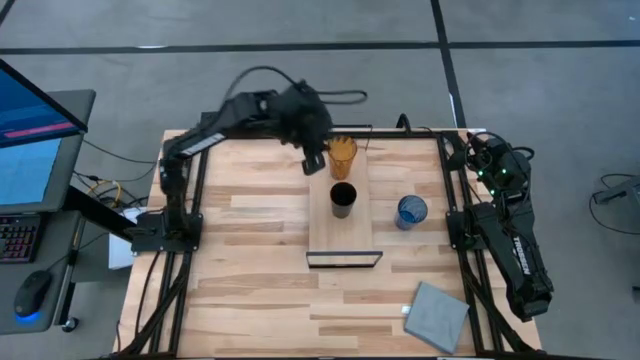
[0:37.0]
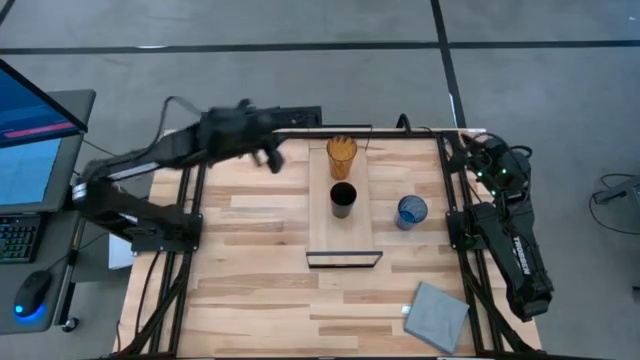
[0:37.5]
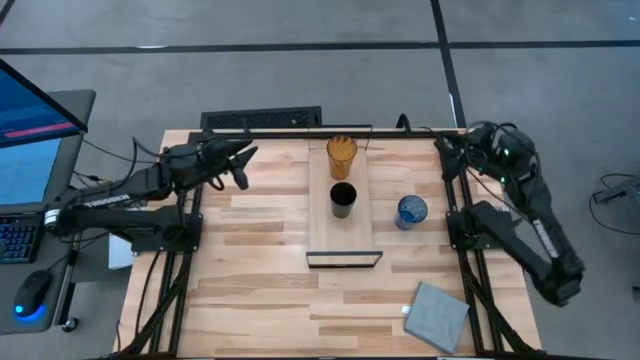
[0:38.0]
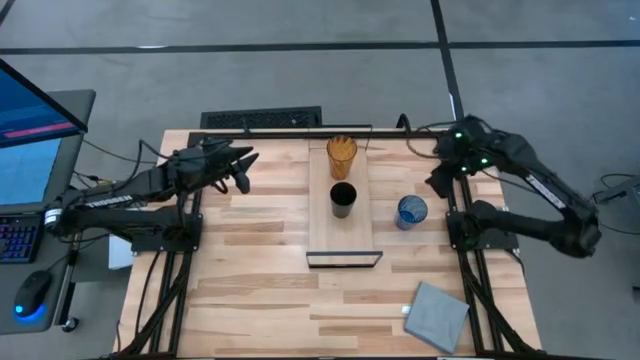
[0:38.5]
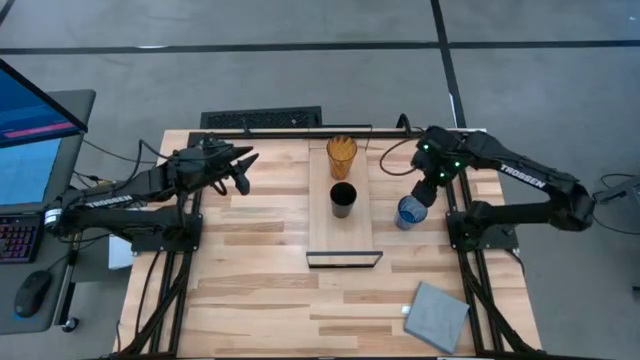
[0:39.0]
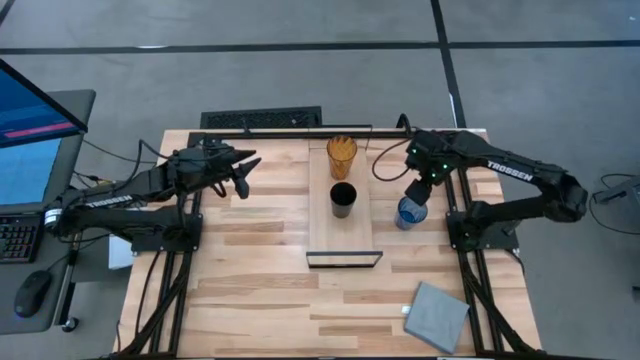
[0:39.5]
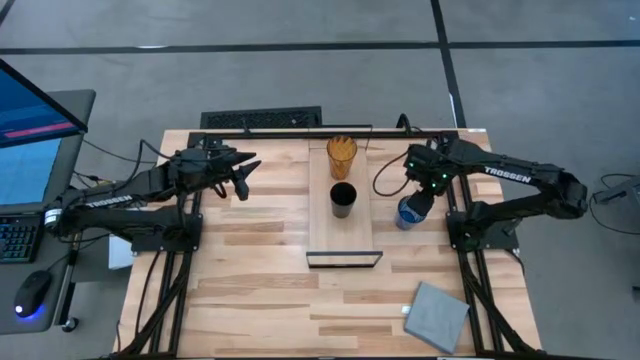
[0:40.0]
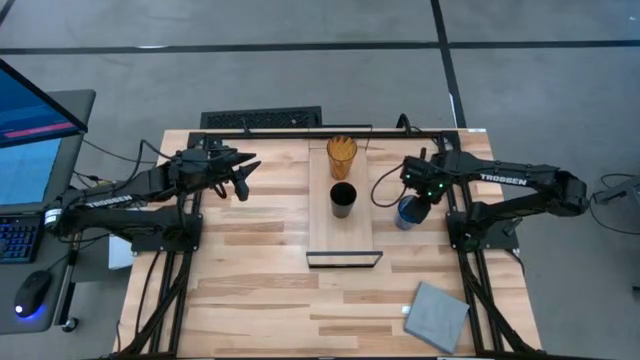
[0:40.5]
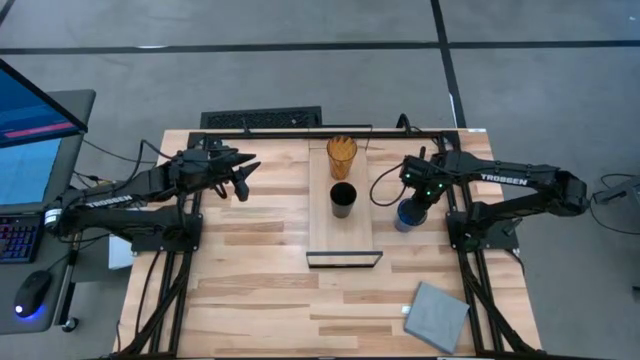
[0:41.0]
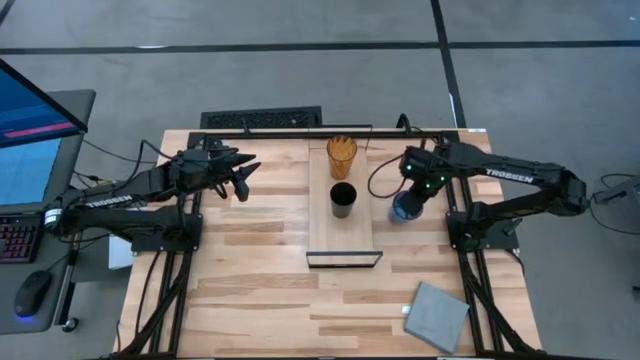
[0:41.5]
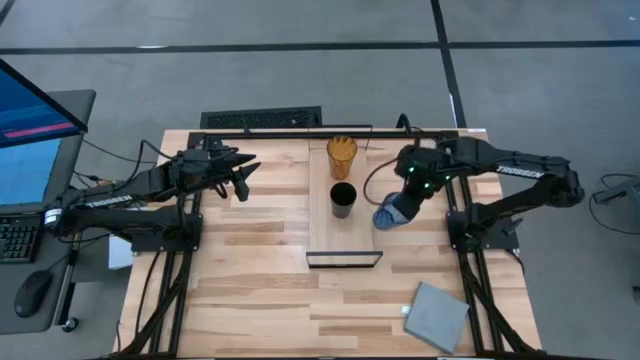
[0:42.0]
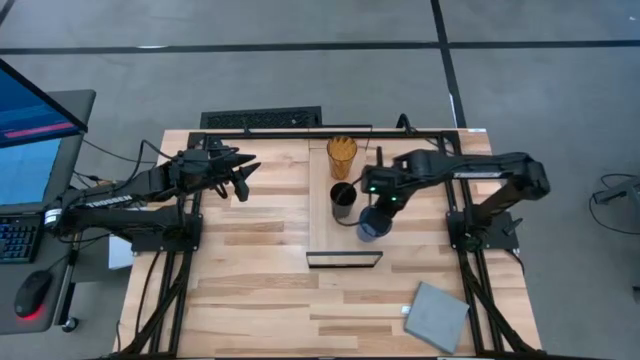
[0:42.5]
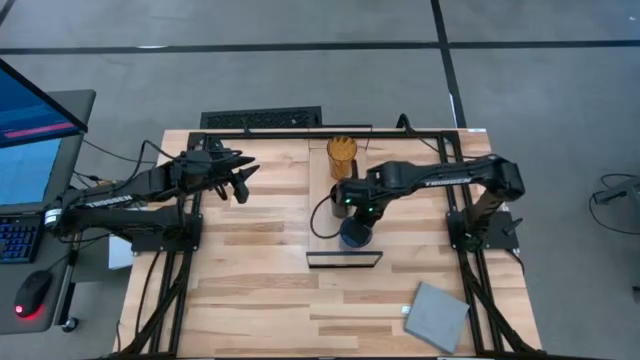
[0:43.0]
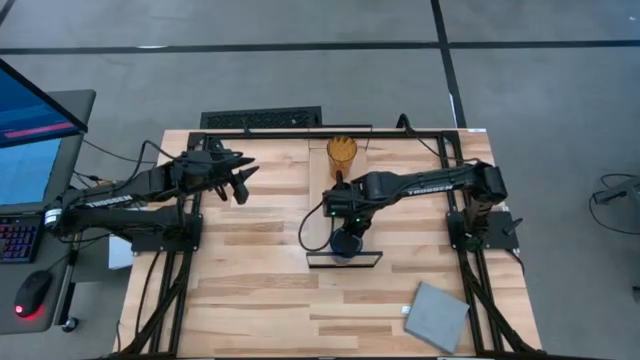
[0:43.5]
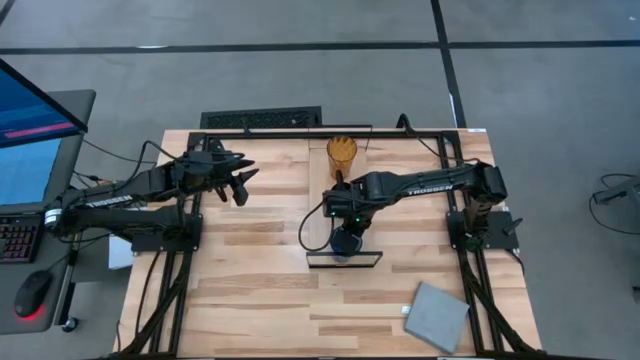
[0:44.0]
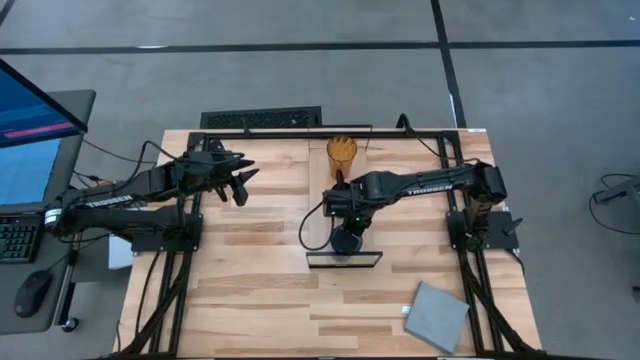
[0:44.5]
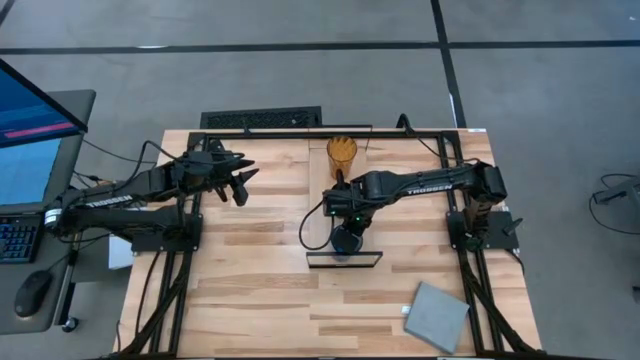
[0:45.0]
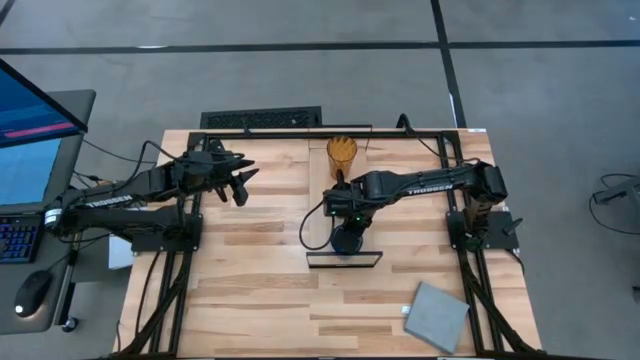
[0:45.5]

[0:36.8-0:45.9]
Task: Stack small to large cups/mugs on shelf
Put the blue cup on the shelf

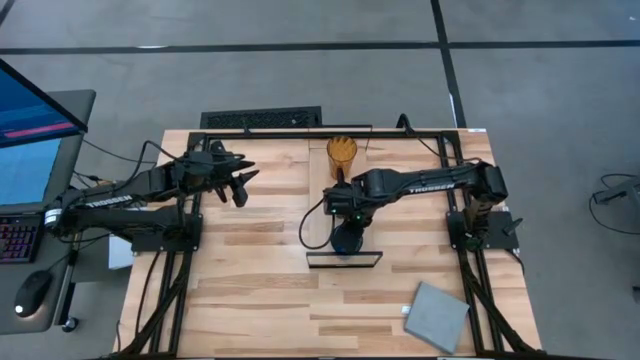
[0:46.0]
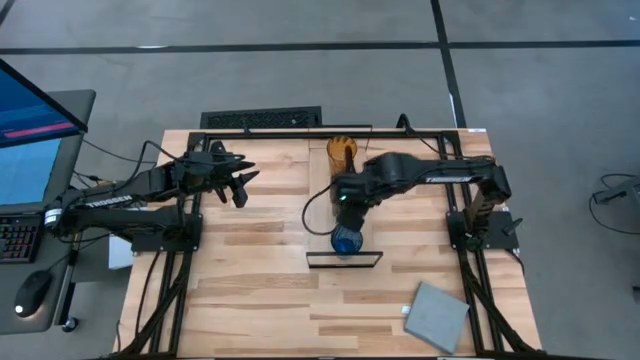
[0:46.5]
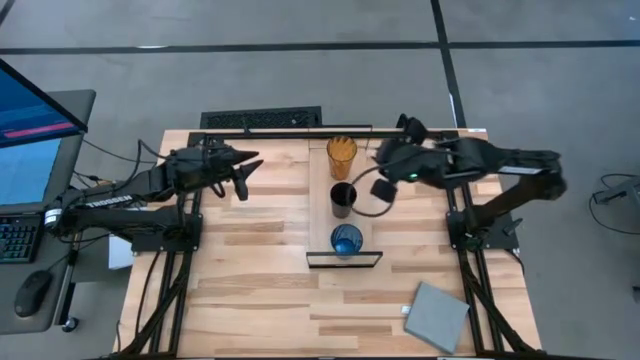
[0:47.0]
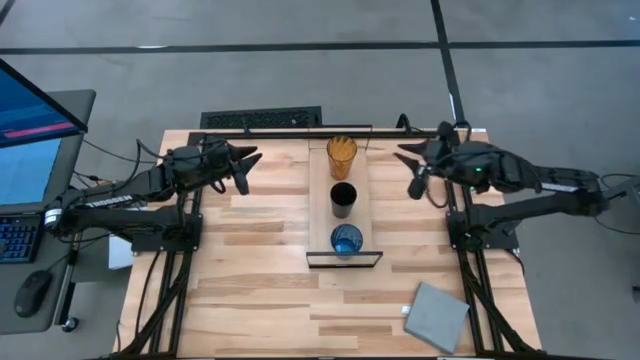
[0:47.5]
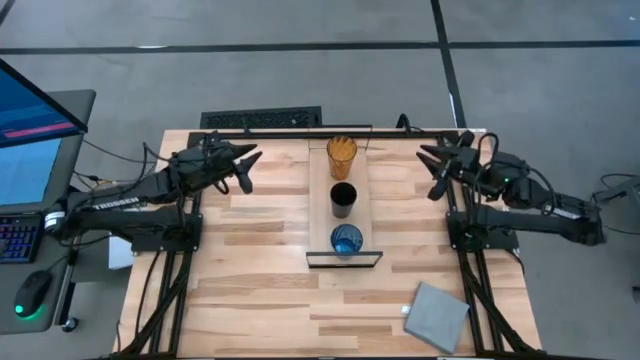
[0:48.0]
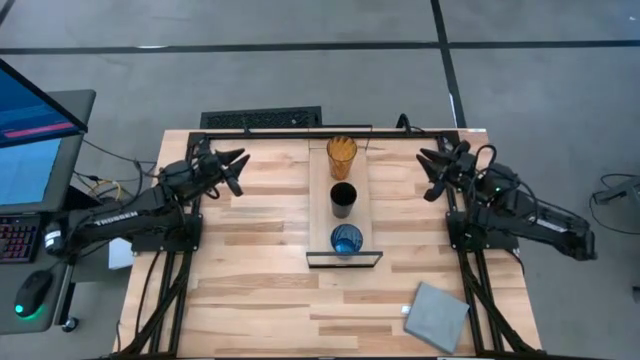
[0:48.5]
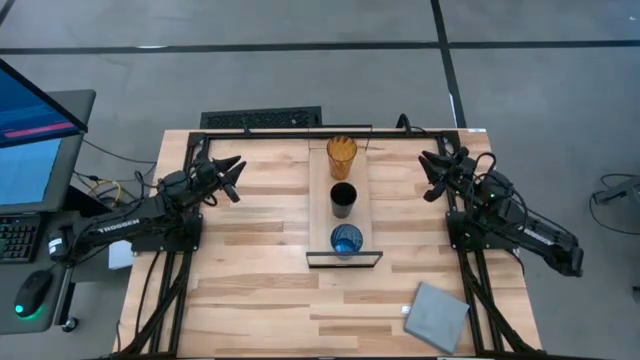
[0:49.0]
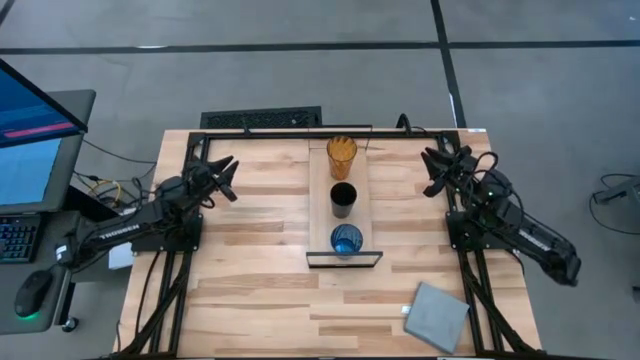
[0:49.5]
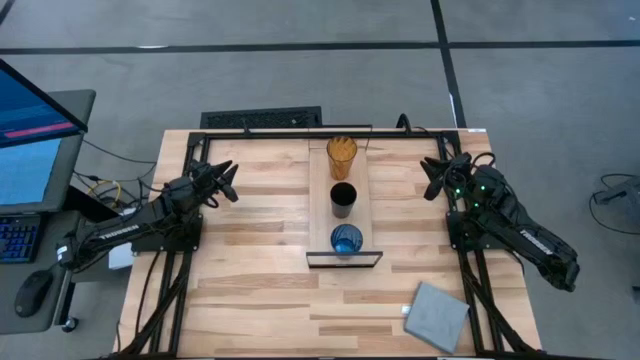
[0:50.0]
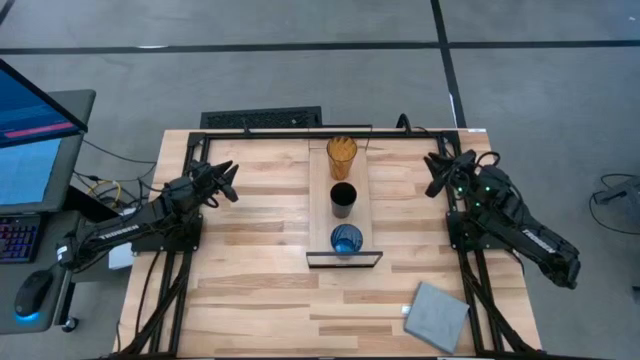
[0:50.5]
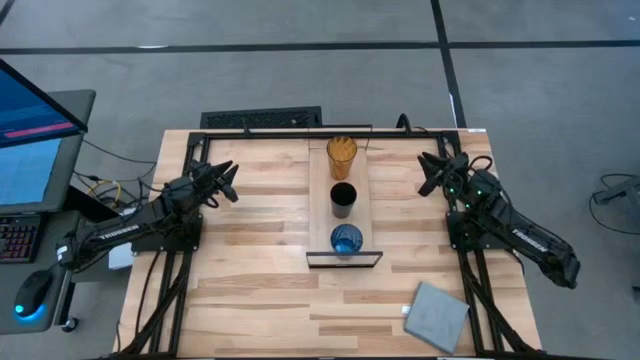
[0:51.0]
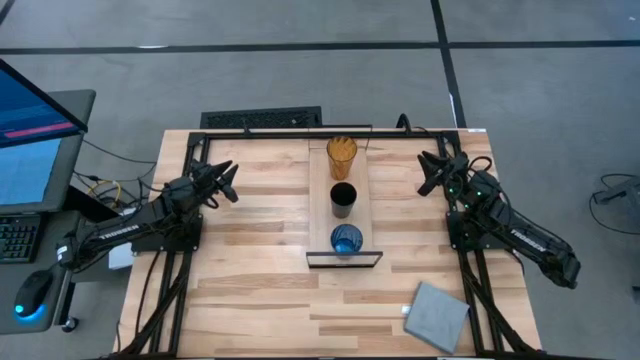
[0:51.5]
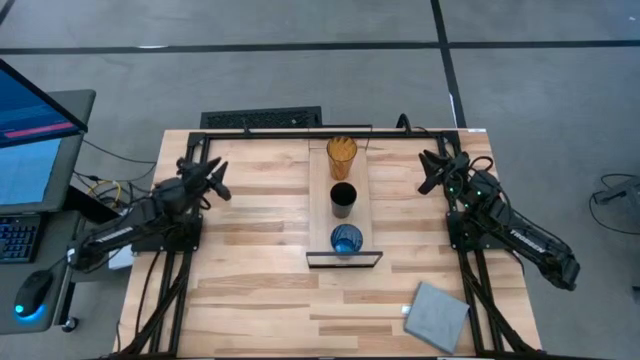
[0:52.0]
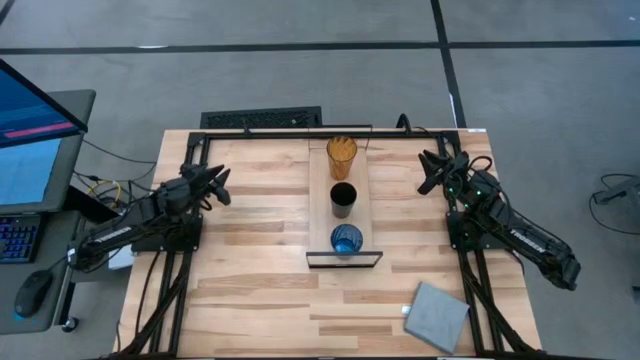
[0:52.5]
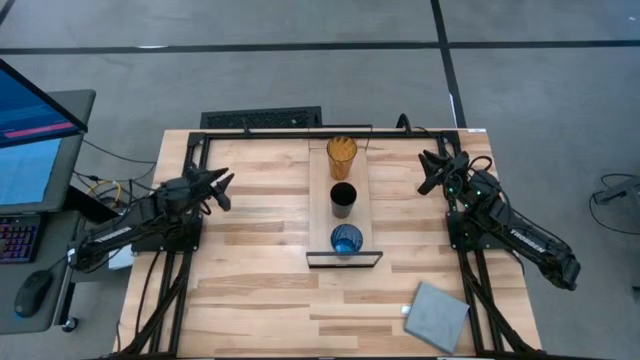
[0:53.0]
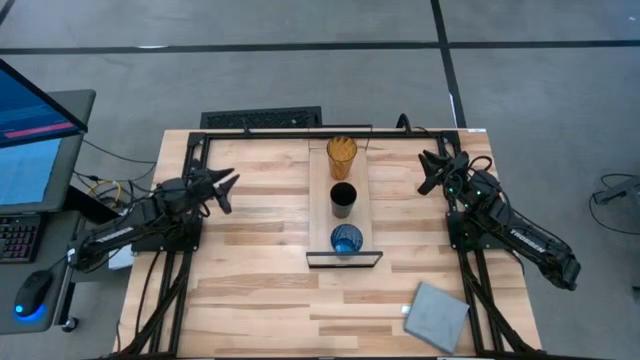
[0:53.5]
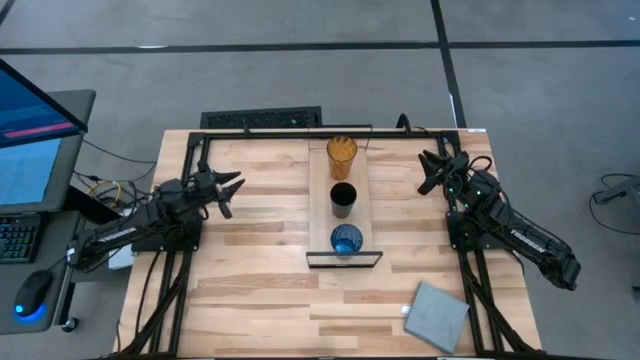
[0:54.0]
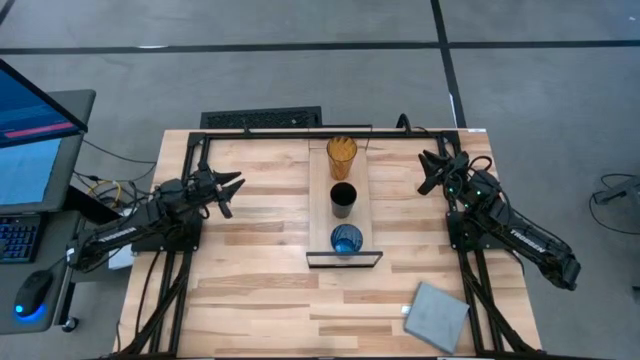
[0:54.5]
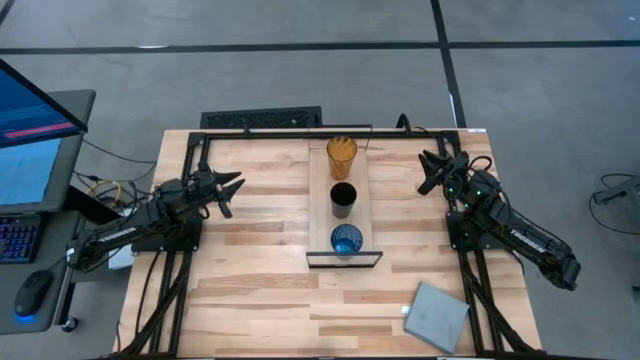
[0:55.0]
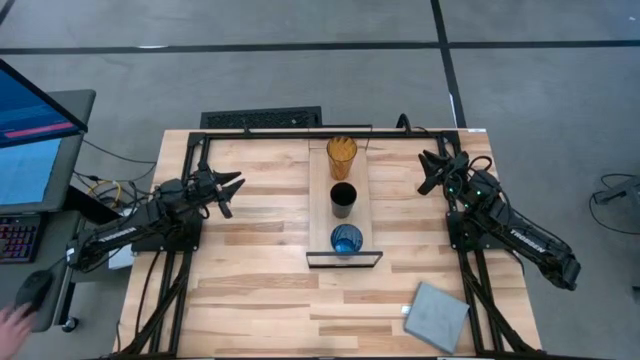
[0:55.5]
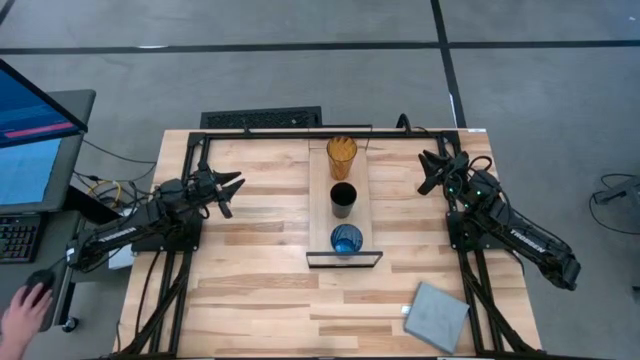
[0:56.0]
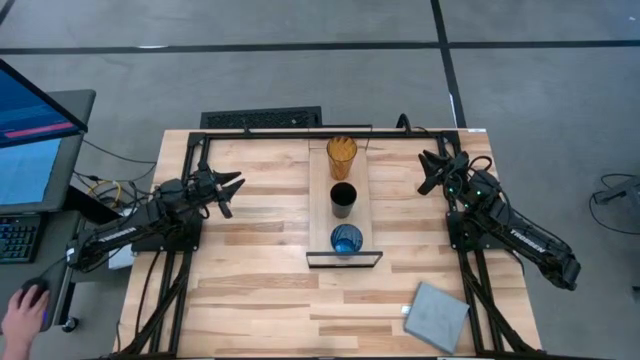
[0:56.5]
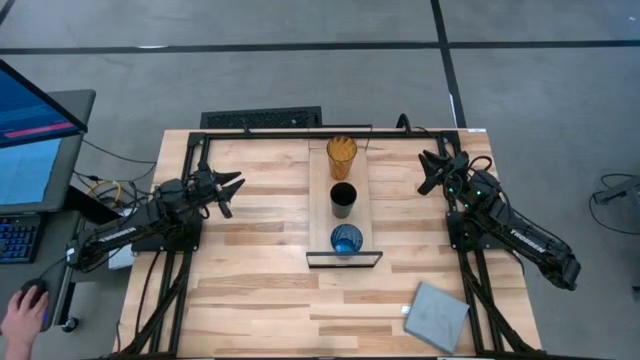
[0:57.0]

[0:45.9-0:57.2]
Return to Home Position
